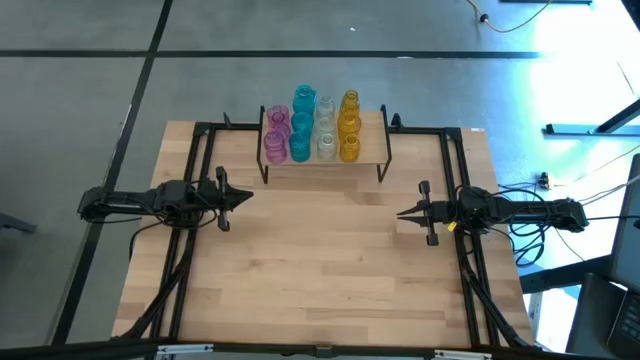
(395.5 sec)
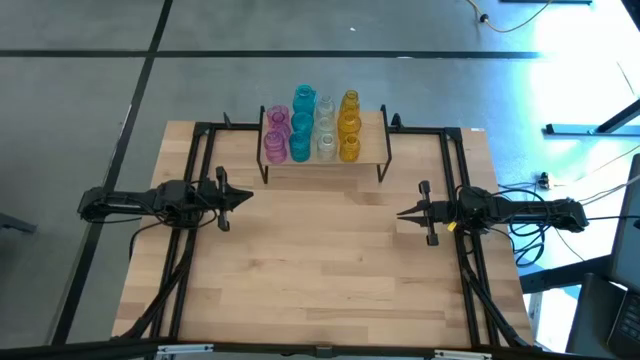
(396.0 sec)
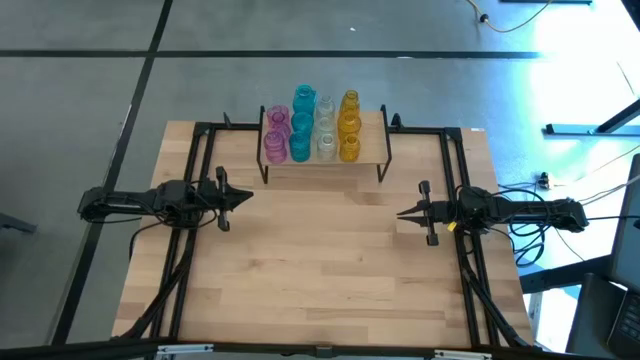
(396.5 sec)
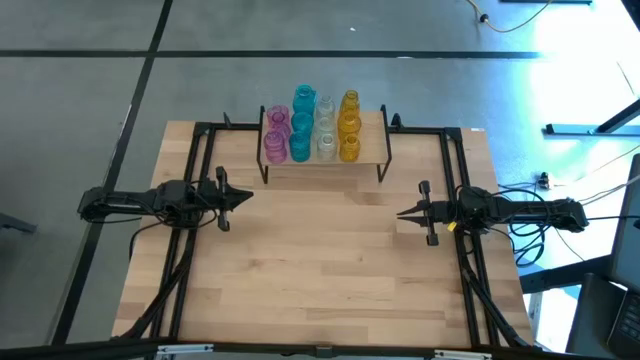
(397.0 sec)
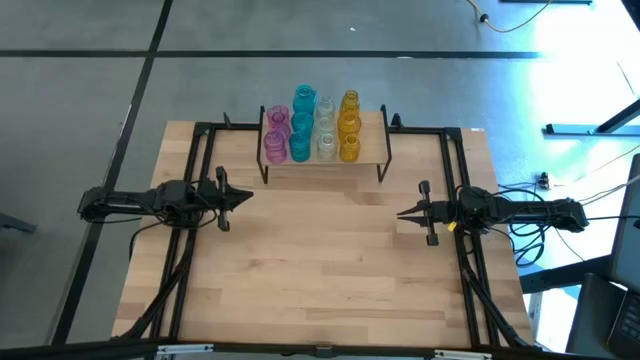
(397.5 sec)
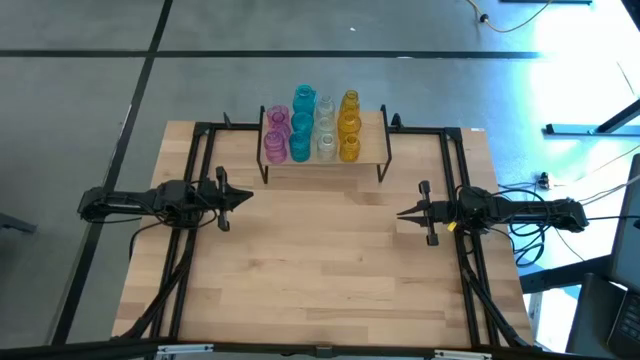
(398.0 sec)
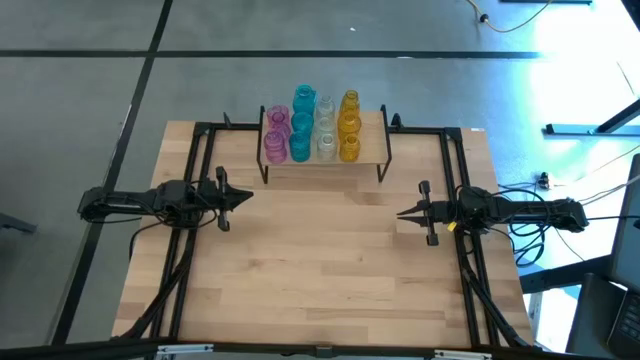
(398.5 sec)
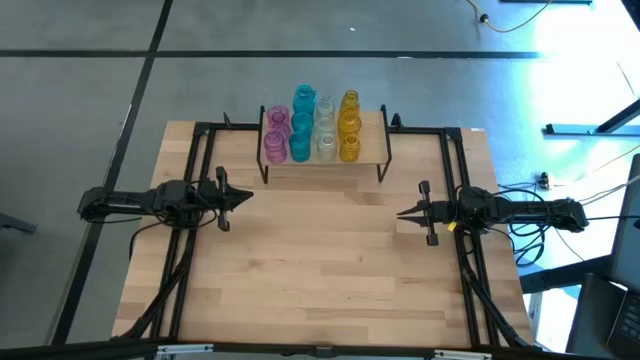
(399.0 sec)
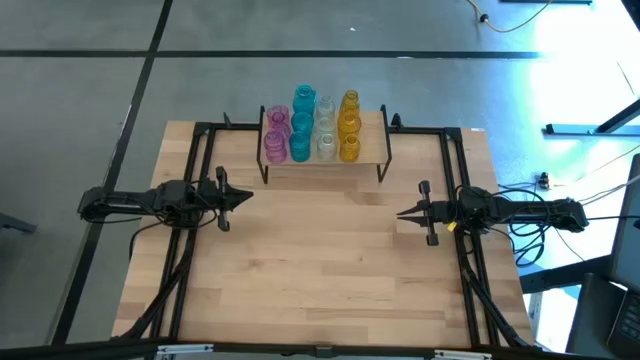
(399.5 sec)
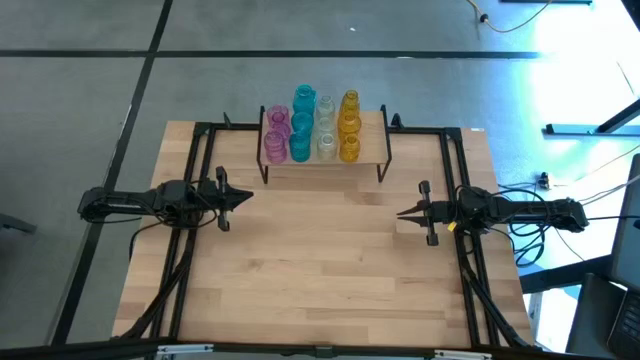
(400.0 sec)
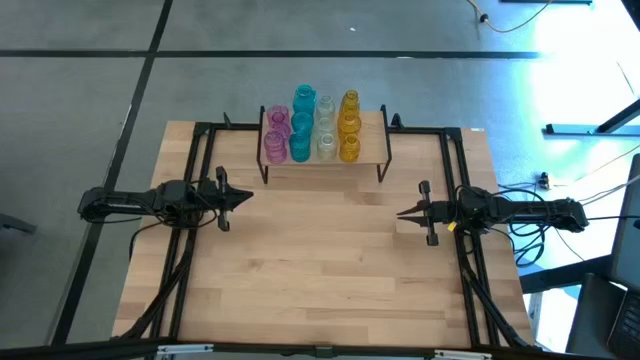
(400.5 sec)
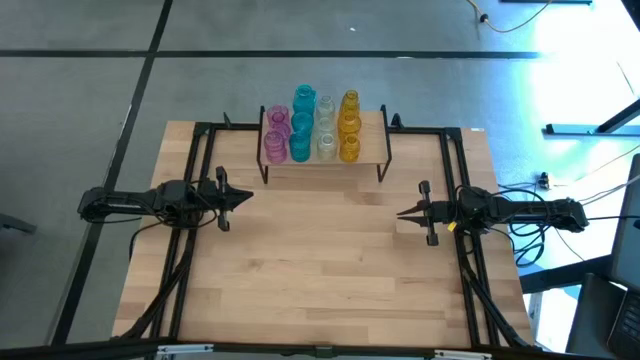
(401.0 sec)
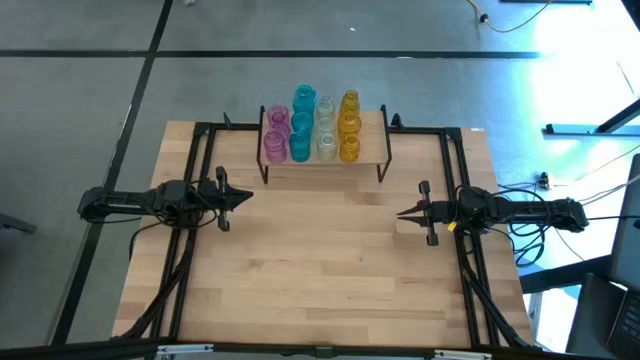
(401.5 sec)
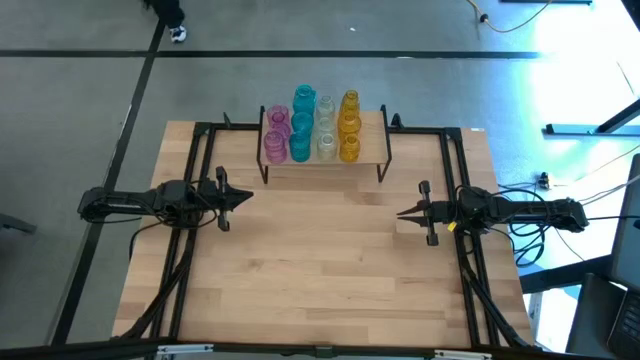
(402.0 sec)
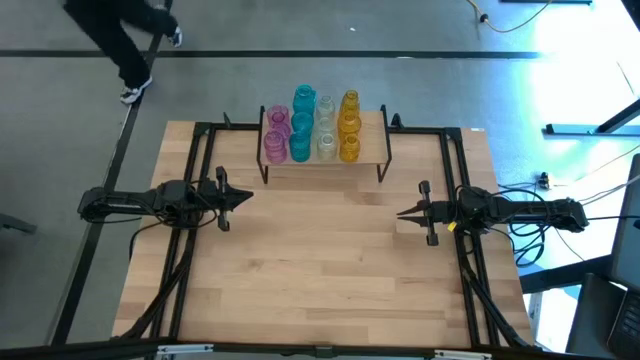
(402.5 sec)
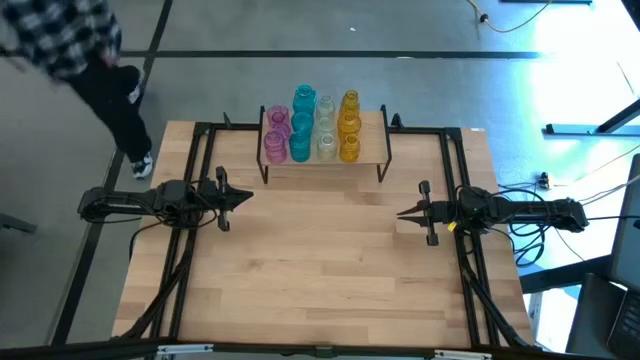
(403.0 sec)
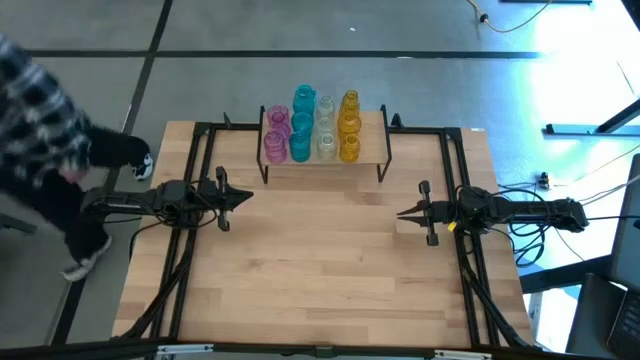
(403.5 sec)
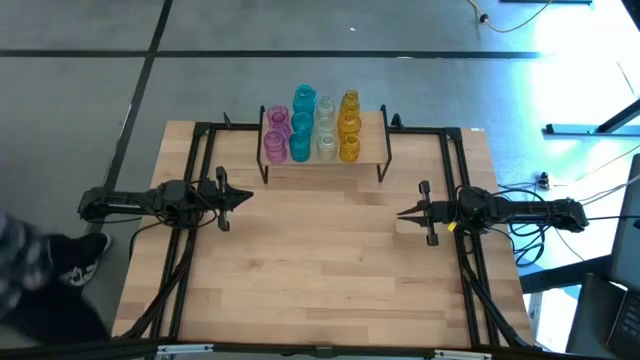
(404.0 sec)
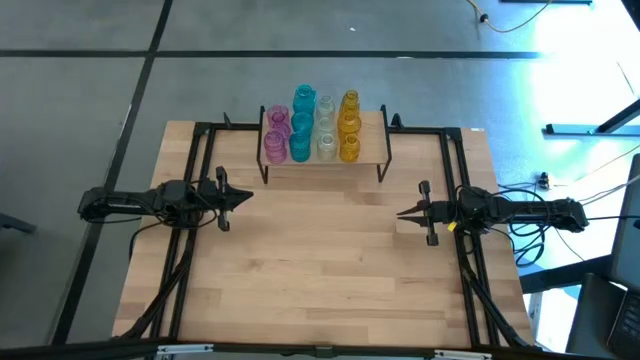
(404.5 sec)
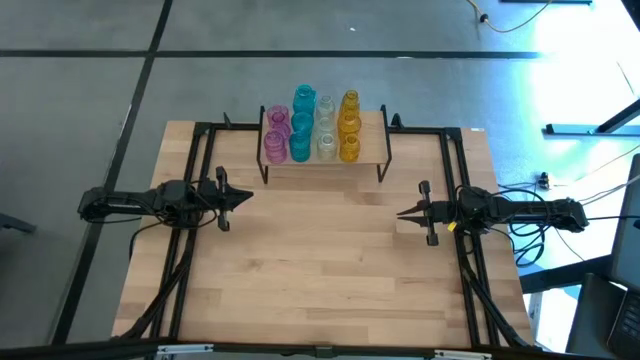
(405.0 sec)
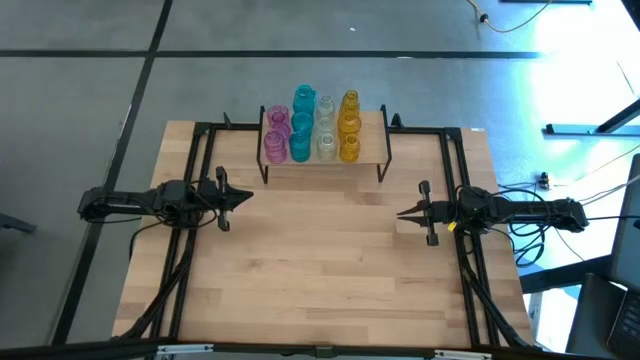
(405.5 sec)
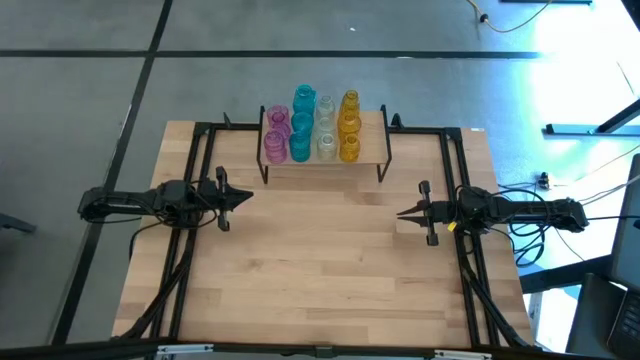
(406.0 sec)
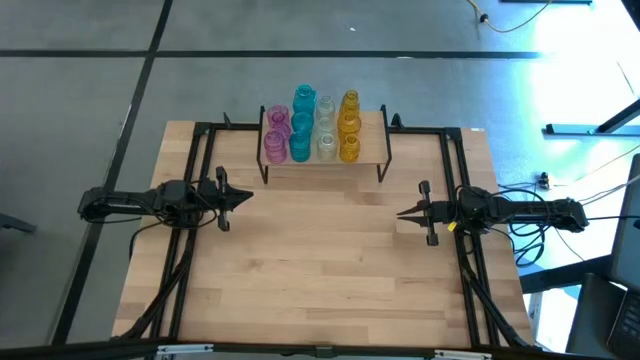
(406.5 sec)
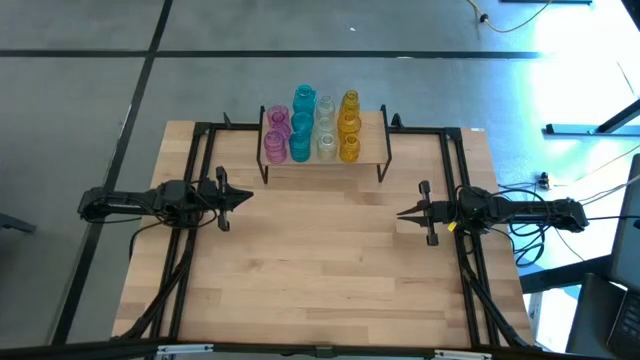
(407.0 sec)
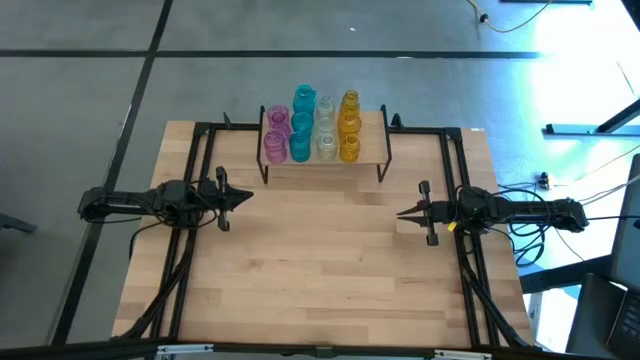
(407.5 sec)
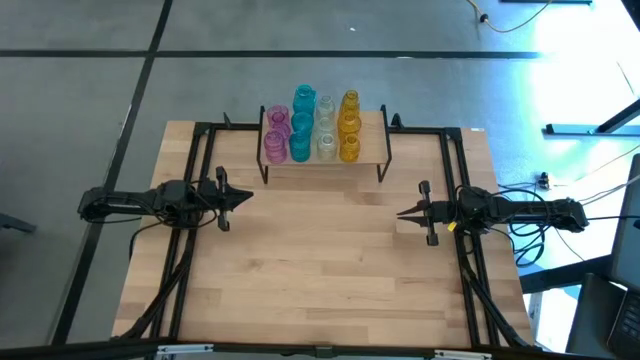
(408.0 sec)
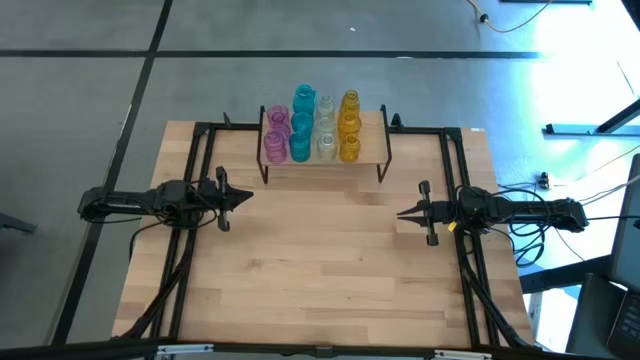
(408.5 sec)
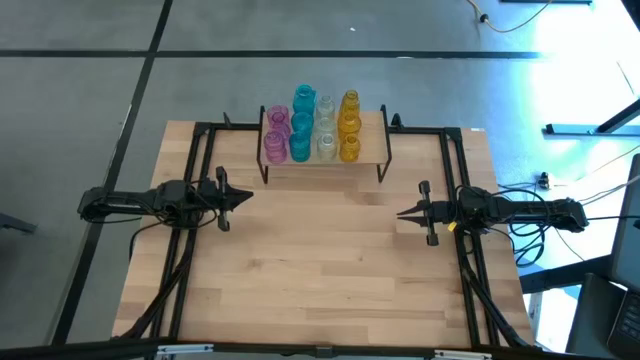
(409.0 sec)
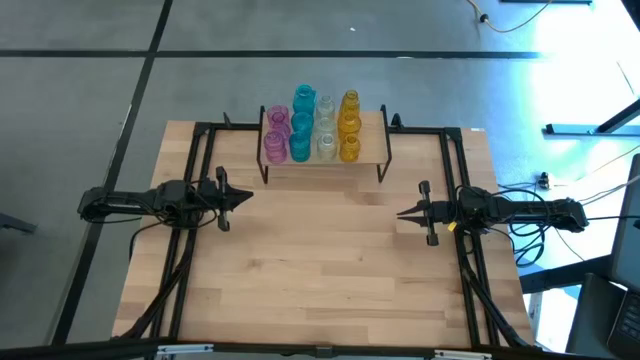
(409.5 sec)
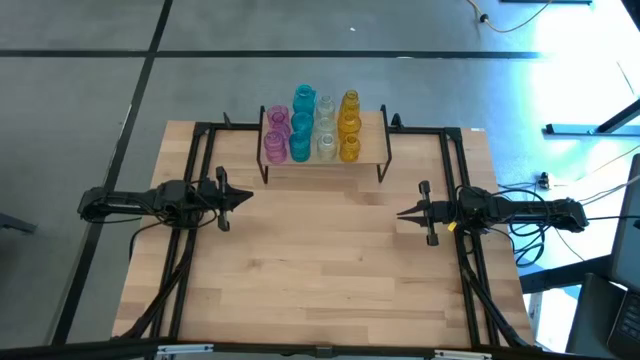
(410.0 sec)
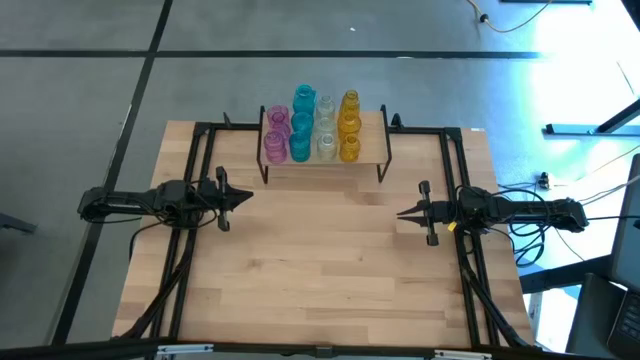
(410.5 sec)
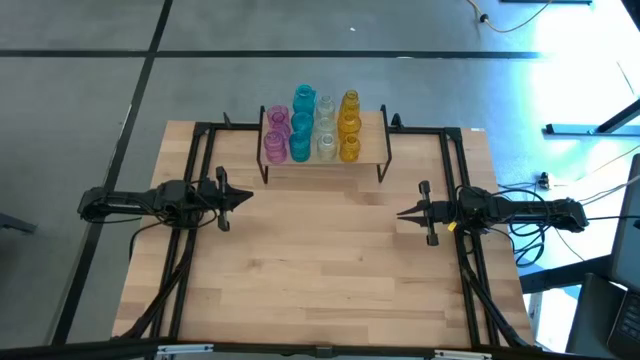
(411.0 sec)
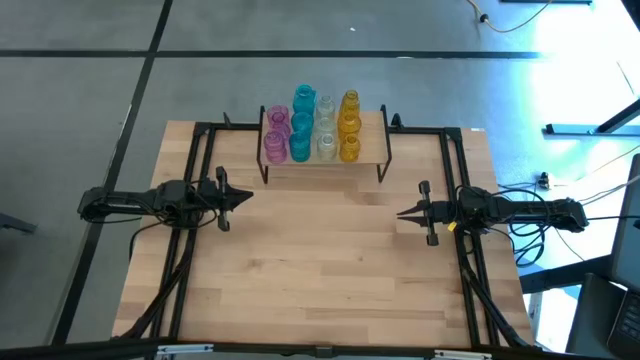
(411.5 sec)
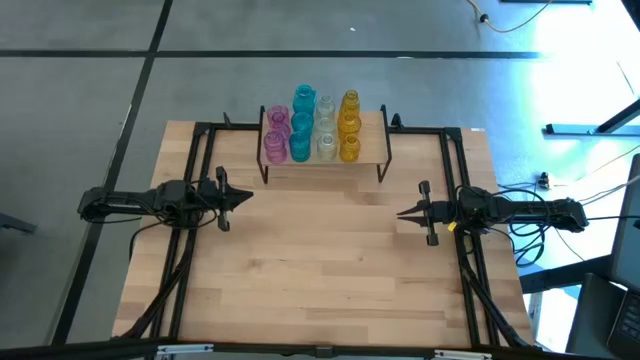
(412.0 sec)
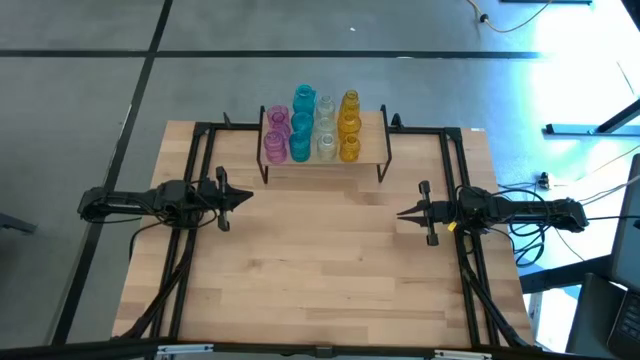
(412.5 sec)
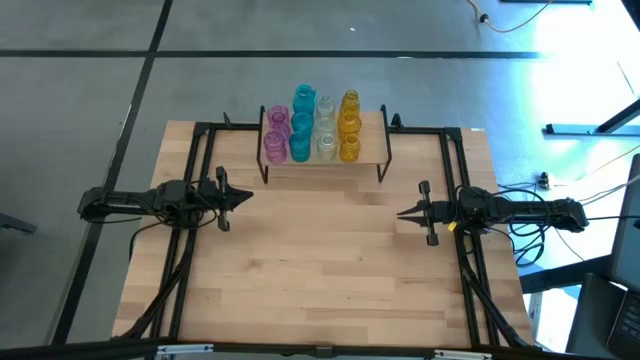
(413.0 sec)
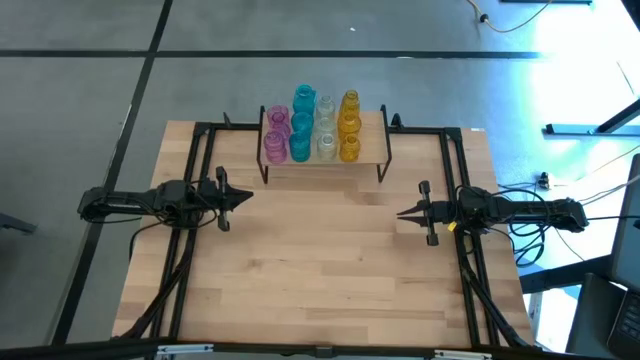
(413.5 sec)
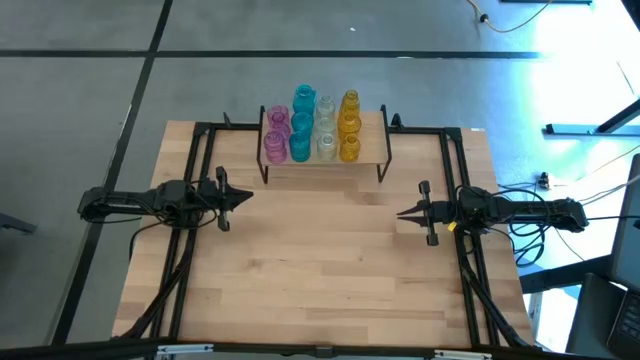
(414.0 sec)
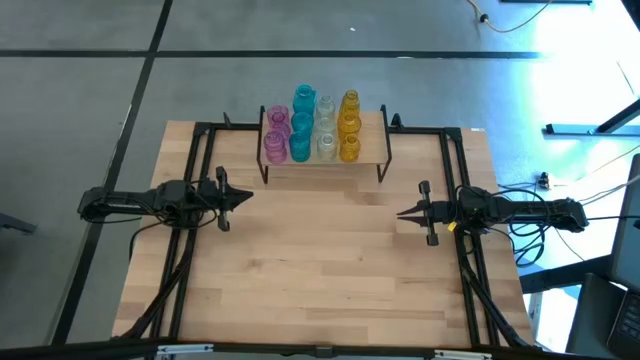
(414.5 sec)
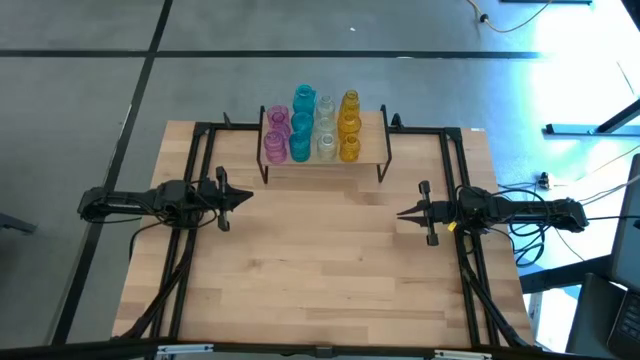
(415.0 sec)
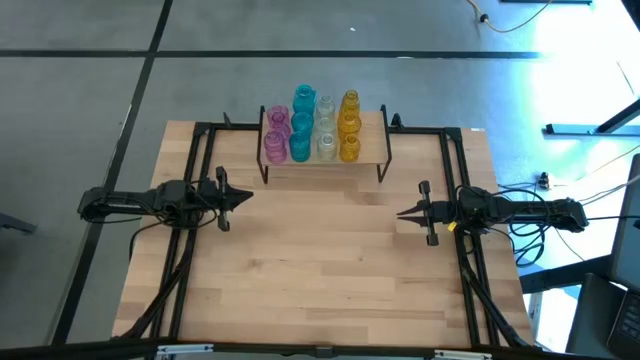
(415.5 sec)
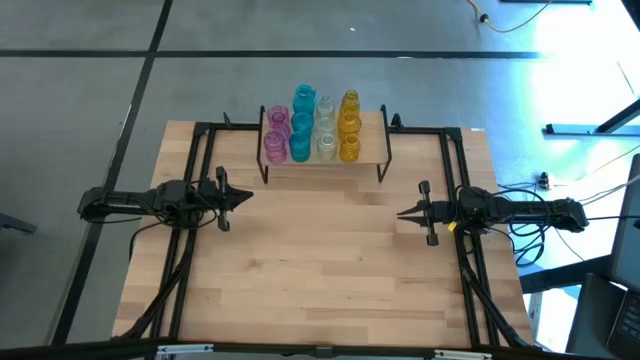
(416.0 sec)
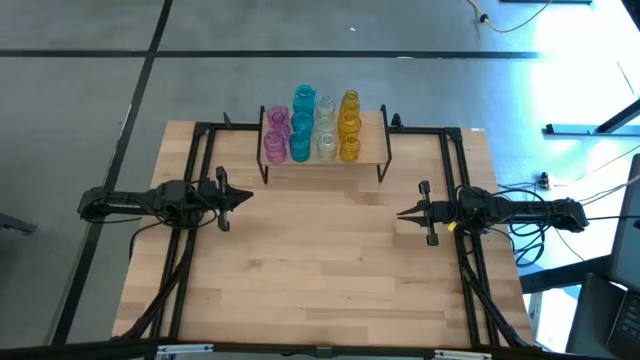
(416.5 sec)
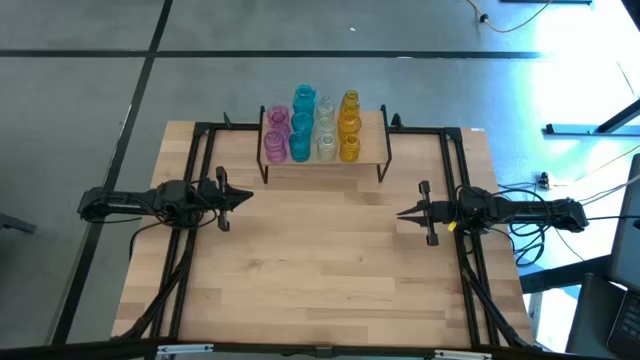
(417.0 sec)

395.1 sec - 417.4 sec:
Task: sort vases onto shelf
Return to Home Position
